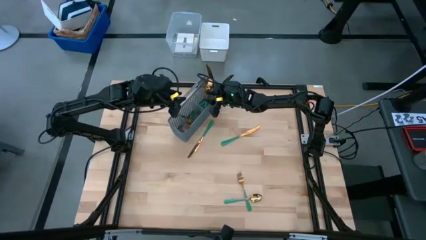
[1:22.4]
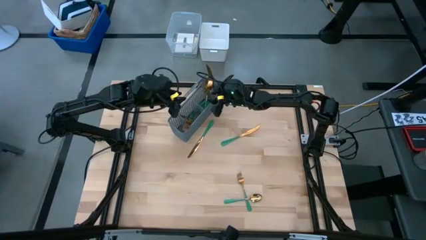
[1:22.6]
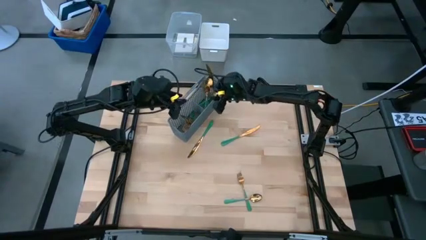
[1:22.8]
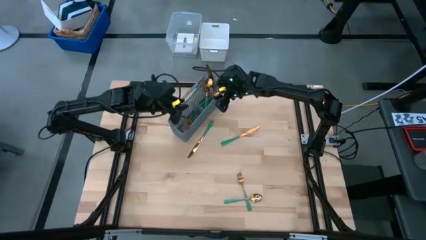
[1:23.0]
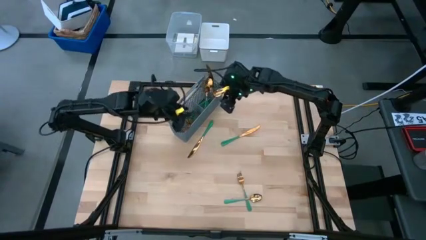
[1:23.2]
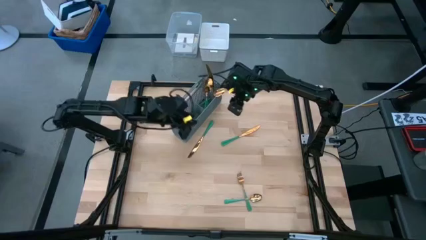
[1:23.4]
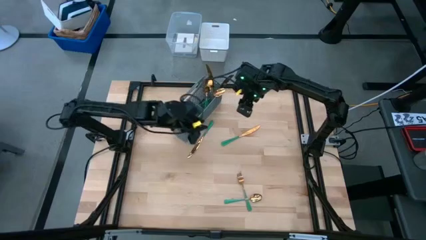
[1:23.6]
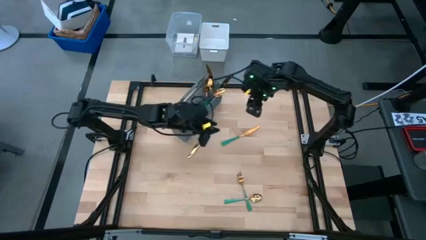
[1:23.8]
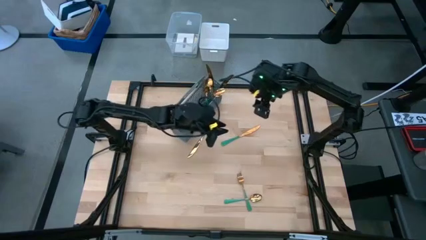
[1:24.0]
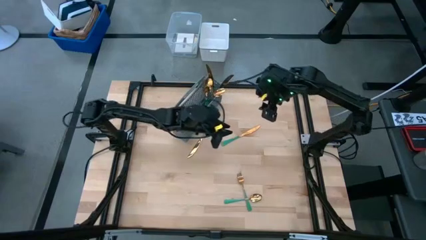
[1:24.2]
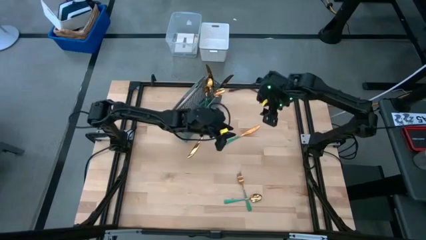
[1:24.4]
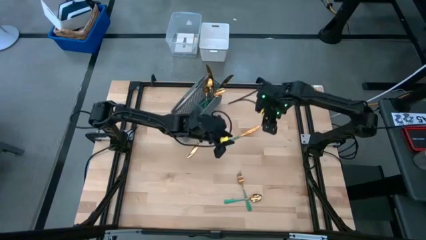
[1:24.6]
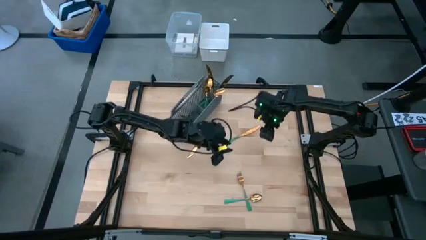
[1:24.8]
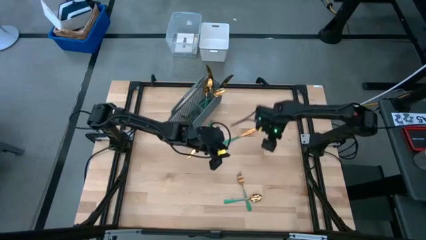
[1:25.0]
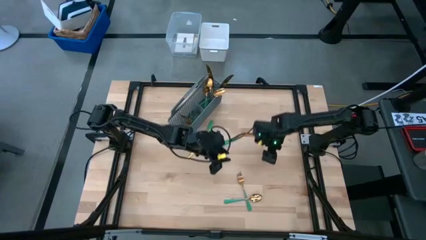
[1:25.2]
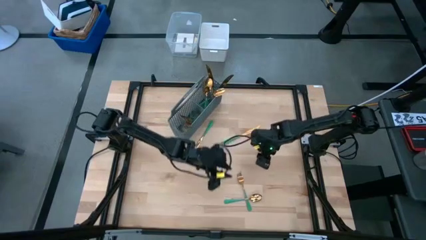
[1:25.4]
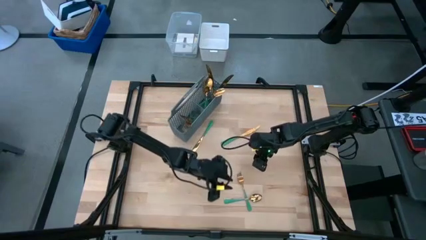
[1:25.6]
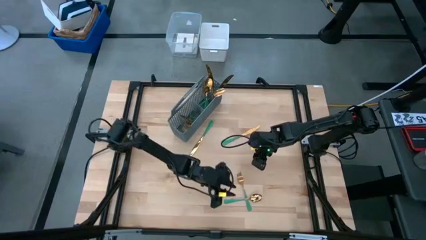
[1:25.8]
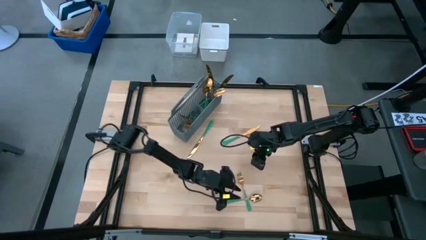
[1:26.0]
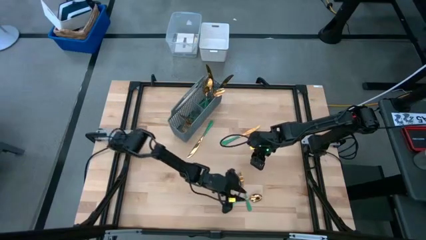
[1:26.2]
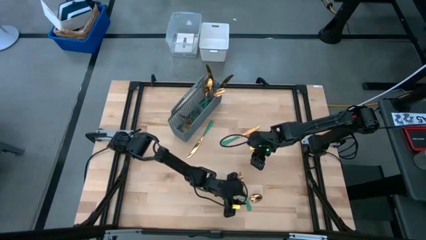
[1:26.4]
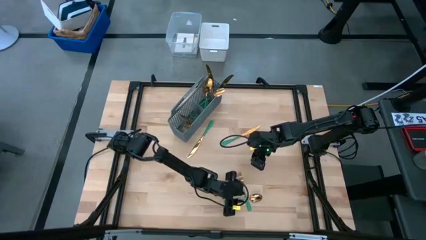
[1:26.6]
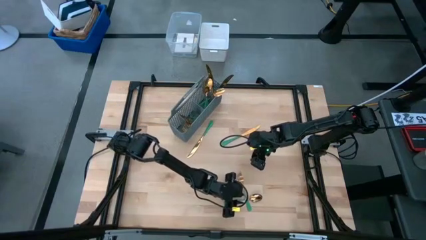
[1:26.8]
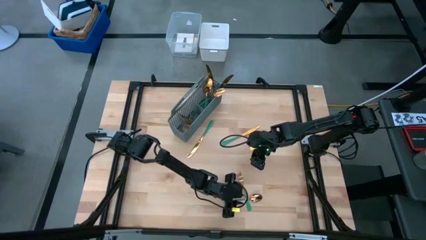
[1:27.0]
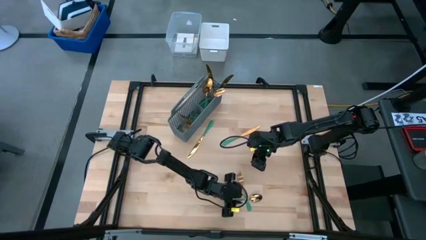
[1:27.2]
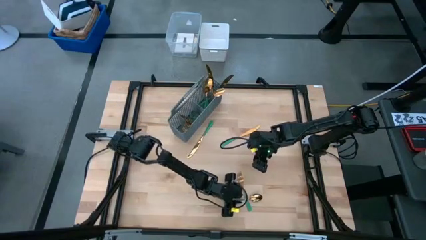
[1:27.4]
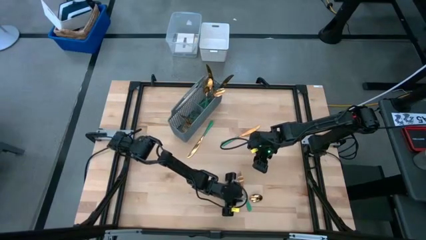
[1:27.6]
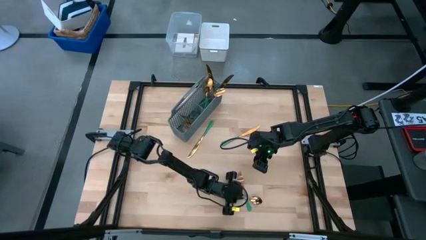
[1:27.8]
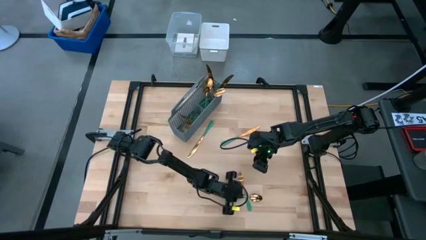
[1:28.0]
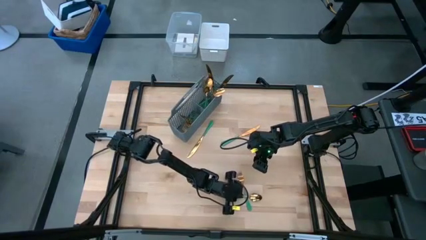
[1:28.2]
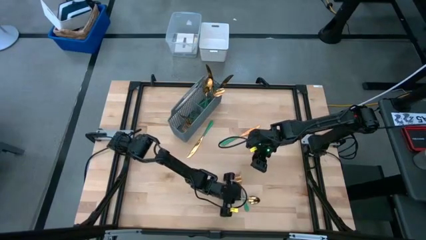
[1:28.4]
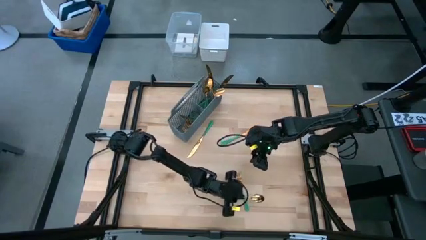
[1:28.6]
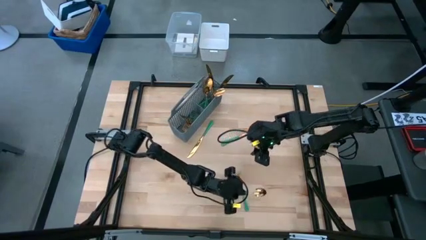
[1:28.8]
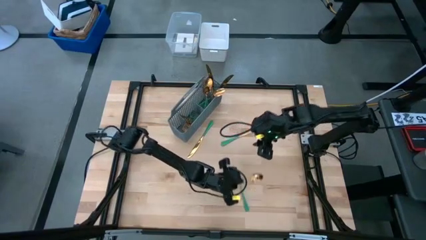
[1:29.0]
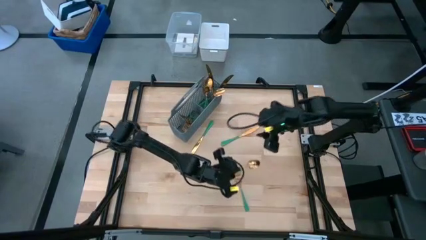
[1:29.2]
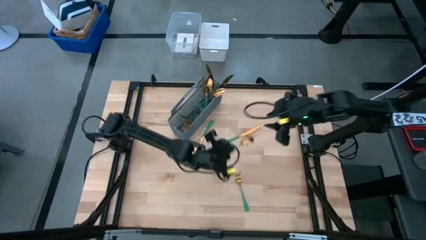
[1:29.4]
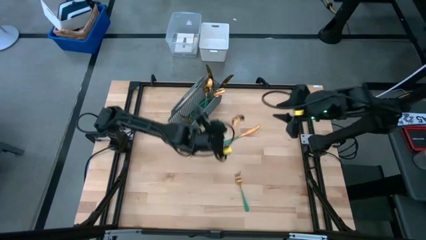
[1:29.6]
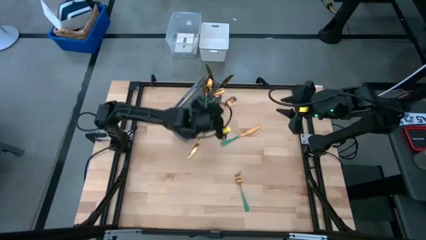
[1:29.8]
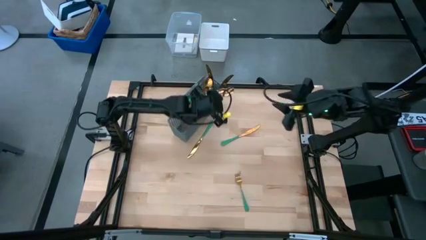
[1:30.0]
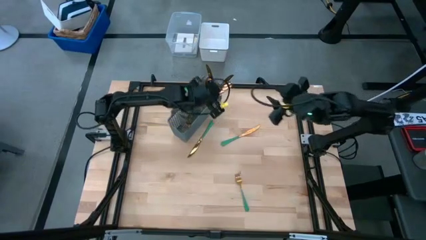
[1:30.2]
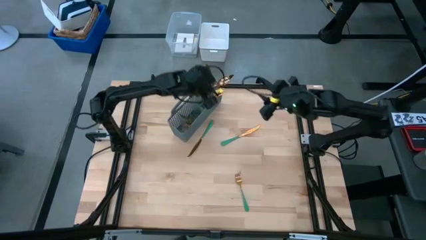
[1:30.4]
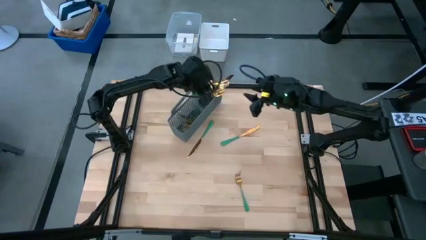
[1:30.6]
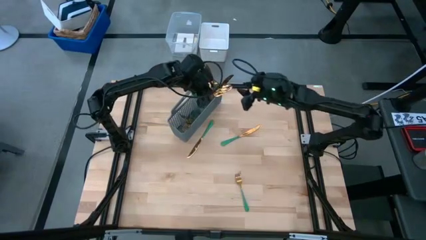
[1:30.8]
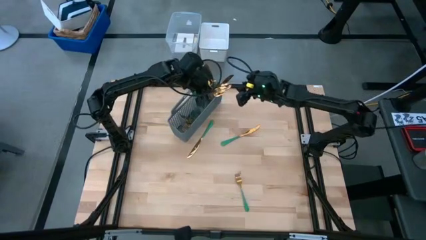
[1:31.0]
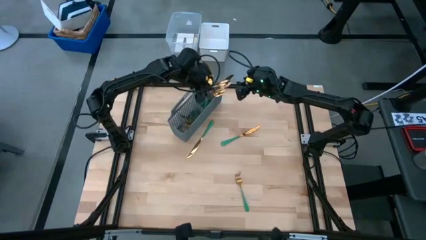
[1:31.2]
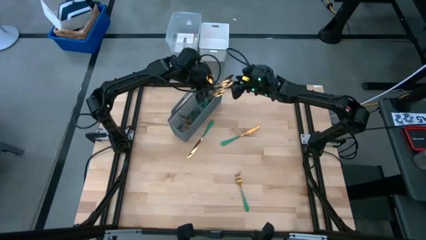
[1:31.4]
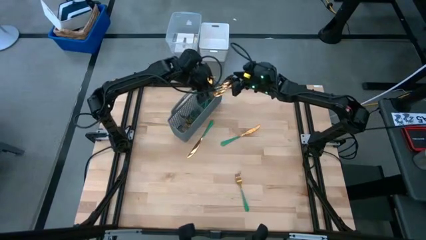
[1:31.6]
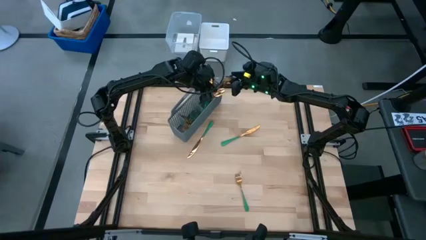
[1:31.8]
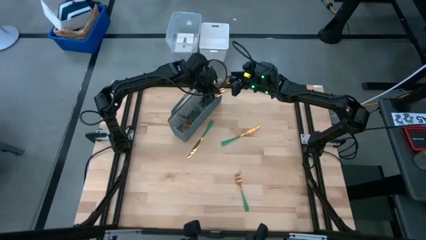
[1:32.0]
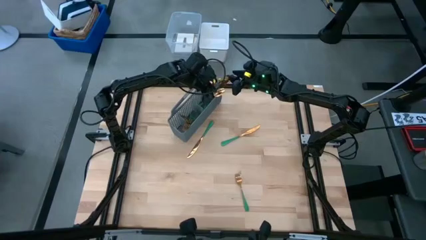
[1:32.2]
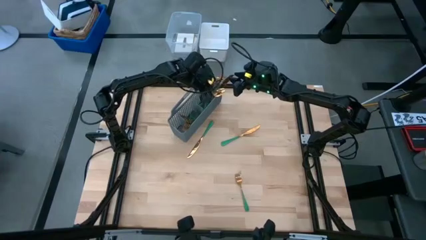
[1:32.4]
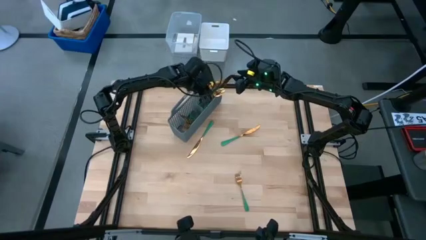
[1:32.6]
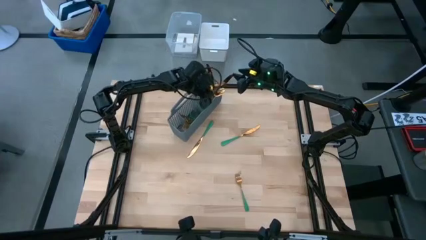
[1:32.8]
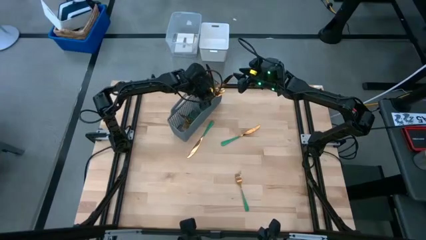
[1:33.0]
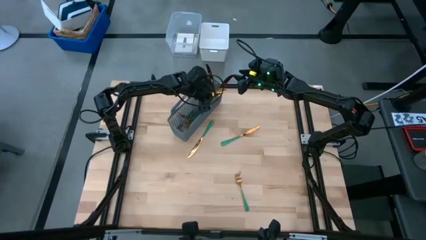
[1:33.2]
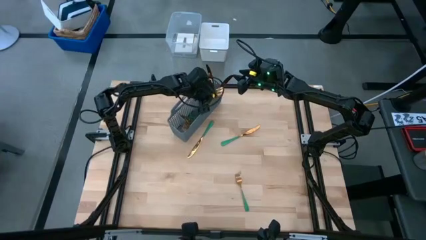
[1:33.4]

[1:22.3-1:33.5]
Task: Sort silverware
Put the green-gold spoon into the silverware basket

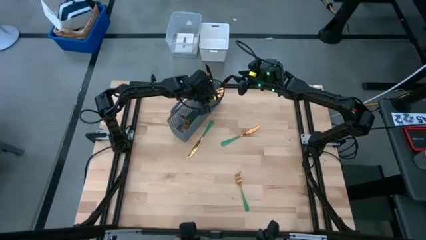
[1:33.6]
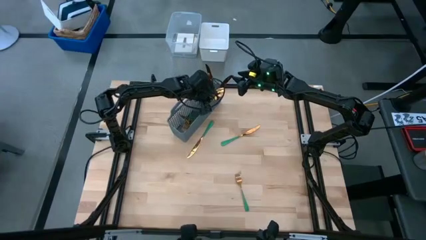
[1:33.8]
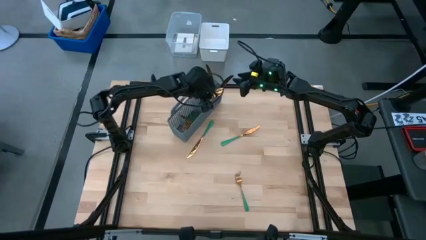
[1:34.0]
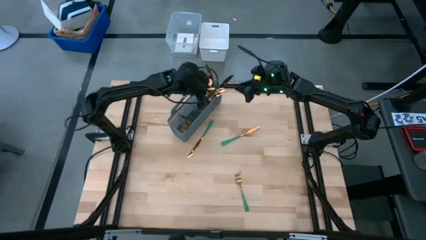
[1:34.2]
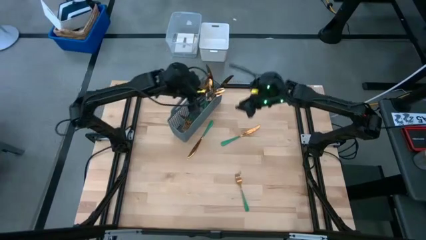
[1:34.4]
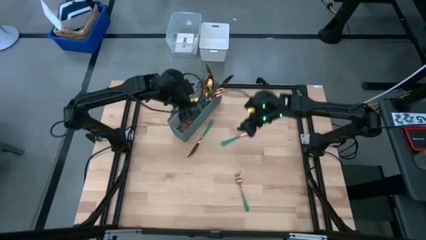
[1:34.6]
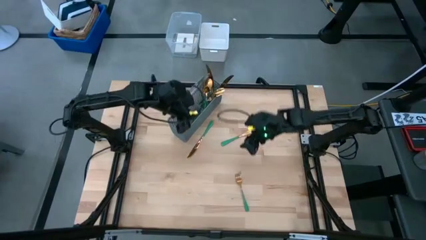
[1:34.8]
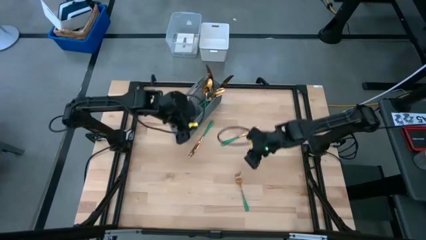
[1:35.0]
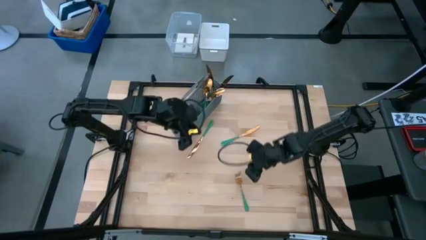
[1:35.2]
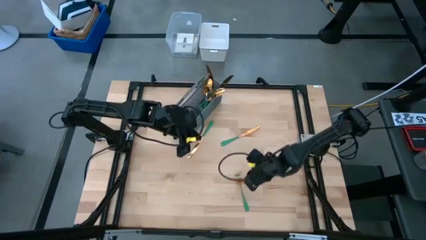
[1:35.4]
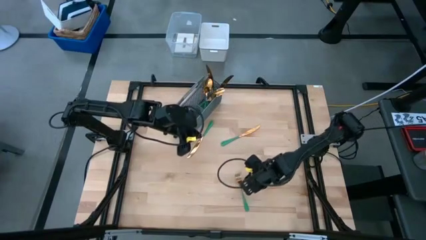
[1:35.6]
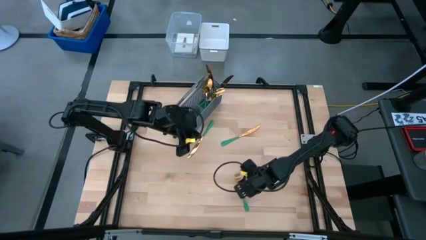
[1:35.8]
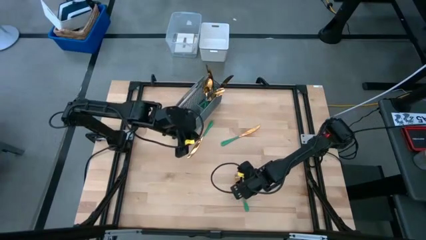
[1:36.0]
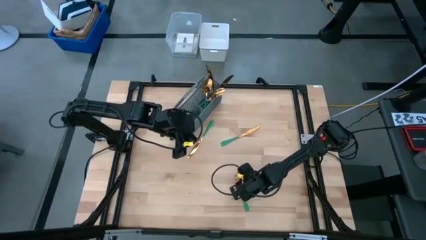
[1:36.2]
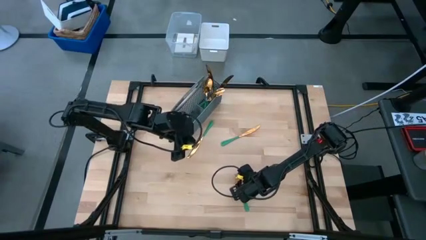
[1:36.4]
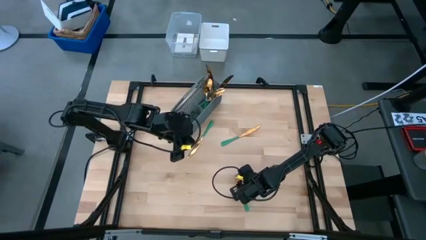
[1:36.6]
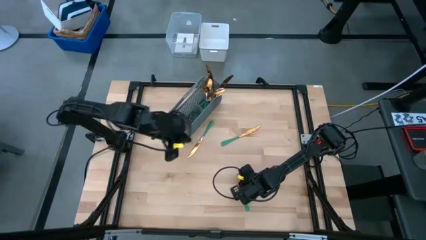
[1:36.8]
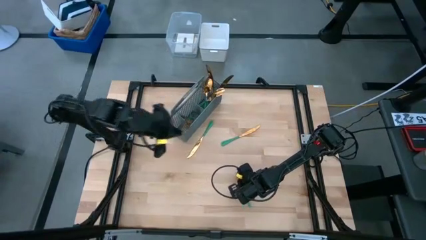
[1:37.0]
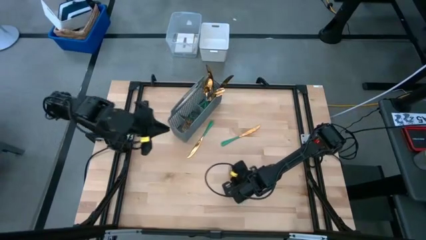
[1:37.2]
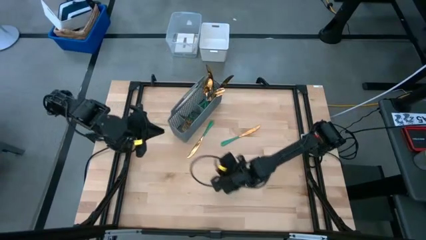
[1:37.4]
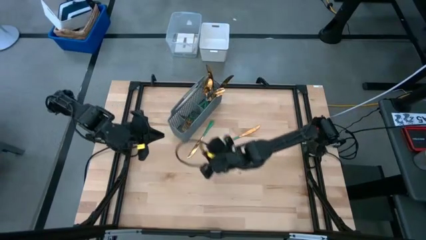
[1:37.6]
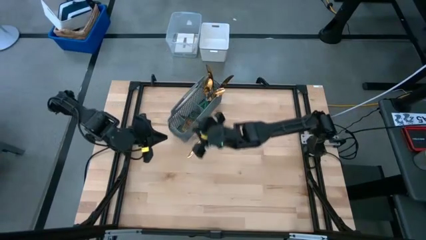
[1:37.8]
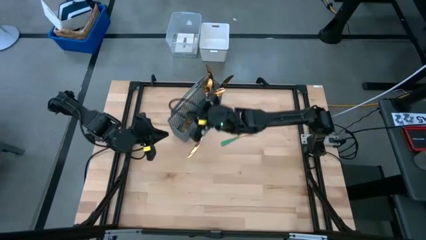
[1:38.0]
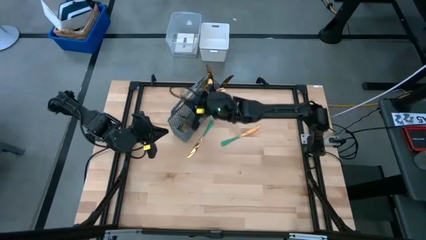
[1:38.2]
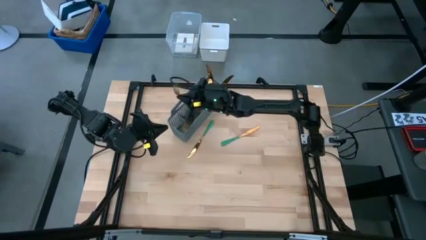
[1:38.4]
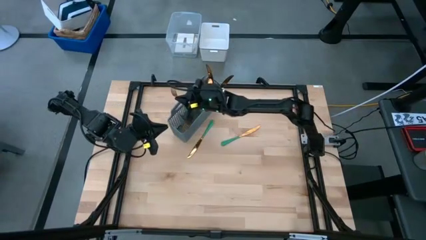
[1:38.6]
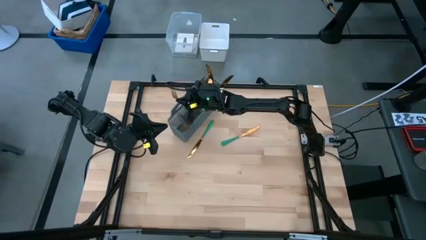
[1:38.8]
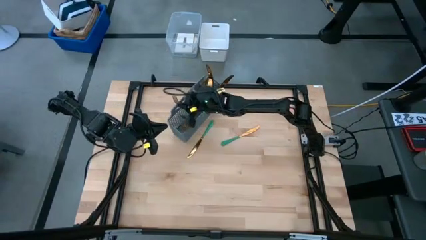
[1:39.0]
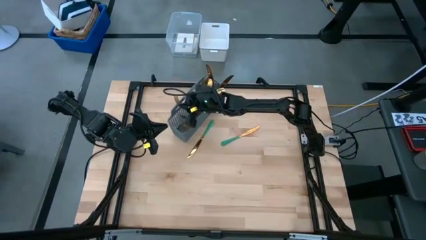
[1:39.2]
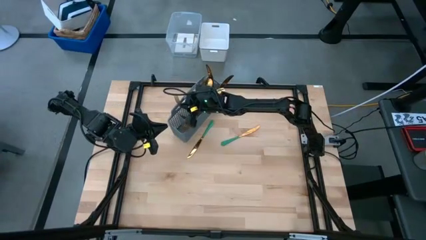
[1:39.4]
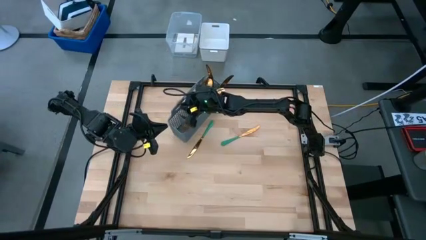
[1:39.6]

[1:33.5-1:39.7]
Put the green-gold fork into the silverware basket
